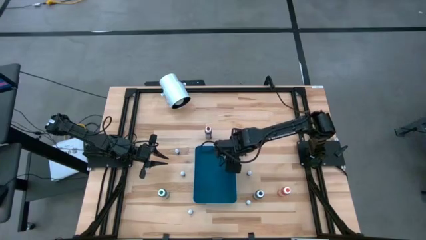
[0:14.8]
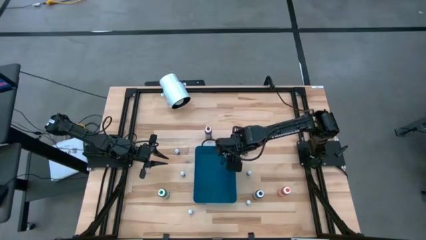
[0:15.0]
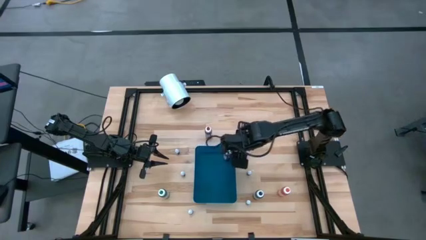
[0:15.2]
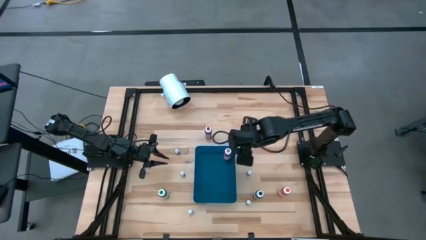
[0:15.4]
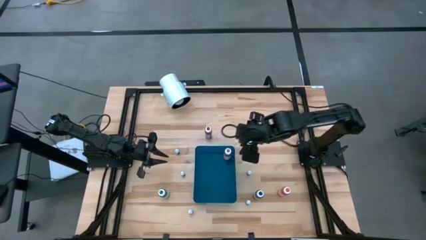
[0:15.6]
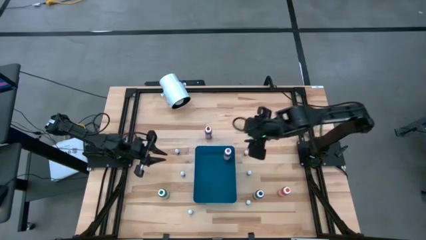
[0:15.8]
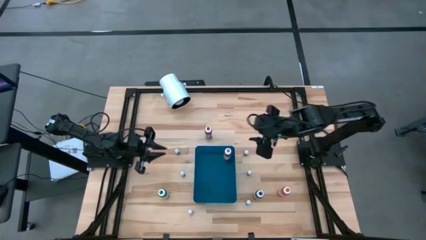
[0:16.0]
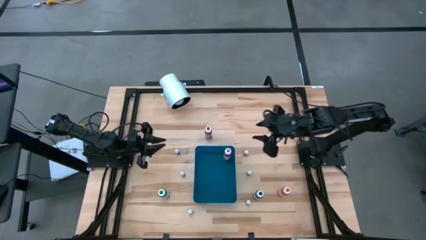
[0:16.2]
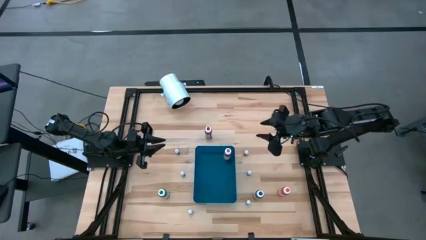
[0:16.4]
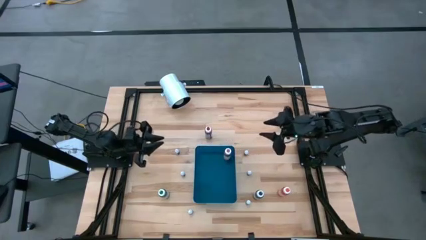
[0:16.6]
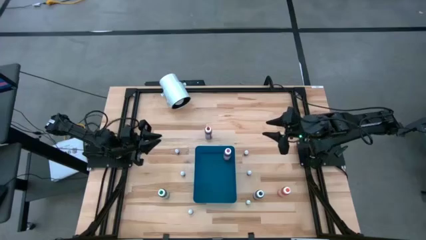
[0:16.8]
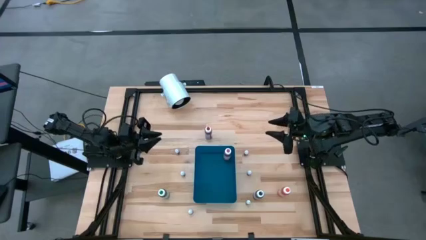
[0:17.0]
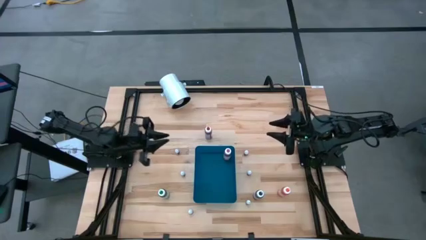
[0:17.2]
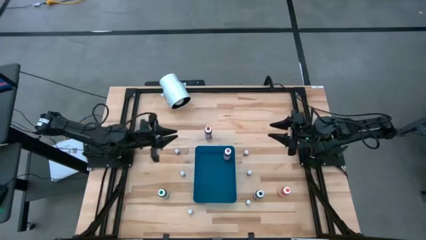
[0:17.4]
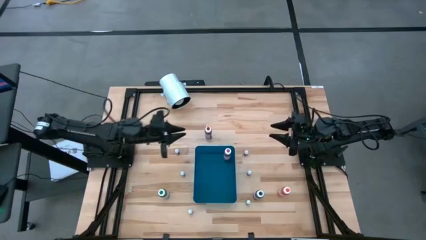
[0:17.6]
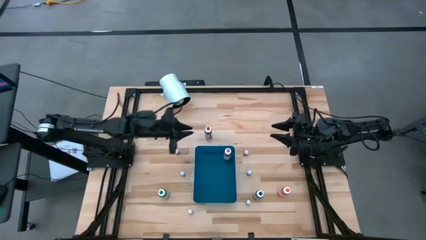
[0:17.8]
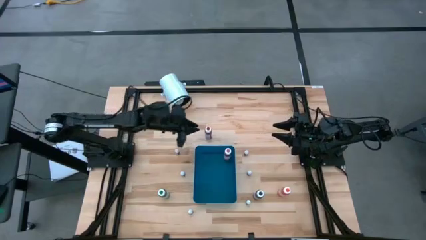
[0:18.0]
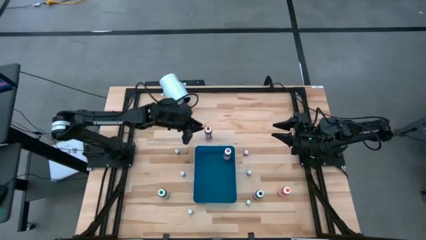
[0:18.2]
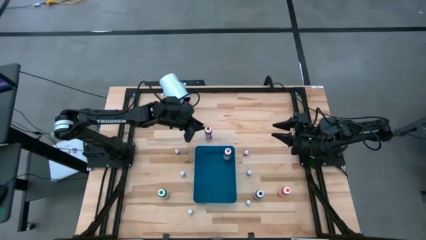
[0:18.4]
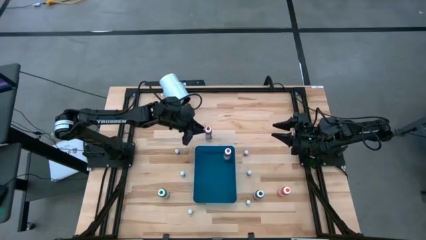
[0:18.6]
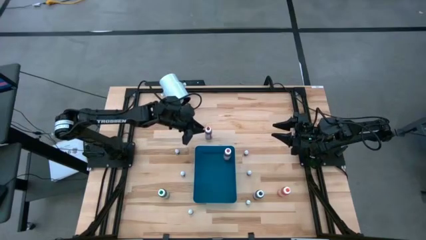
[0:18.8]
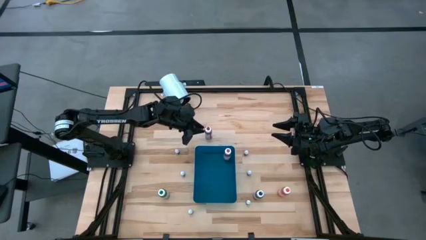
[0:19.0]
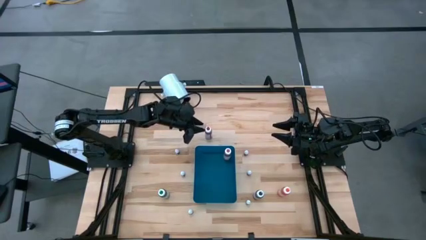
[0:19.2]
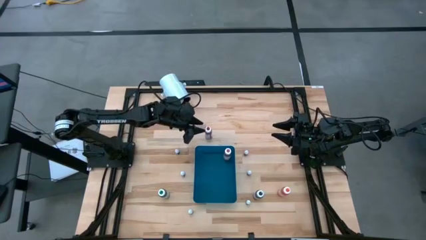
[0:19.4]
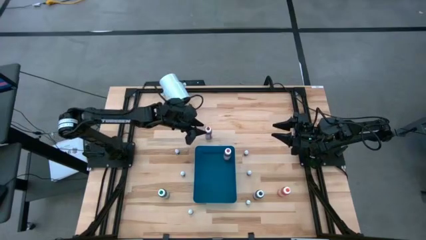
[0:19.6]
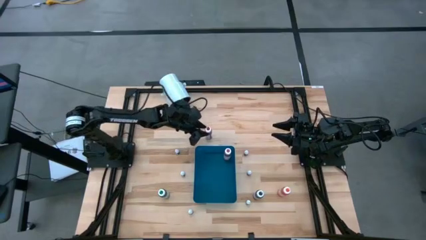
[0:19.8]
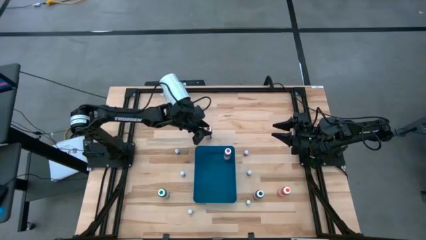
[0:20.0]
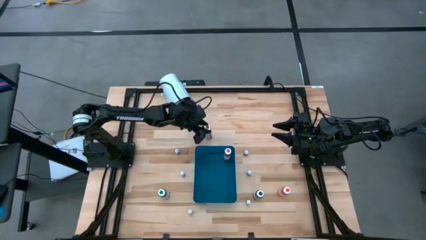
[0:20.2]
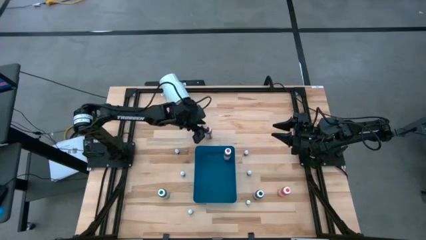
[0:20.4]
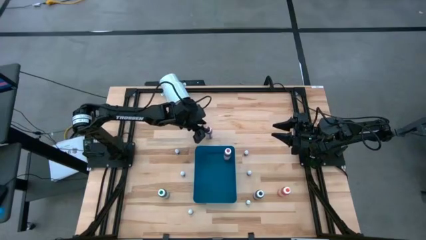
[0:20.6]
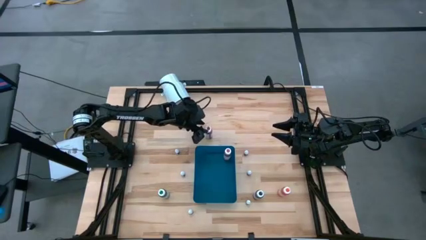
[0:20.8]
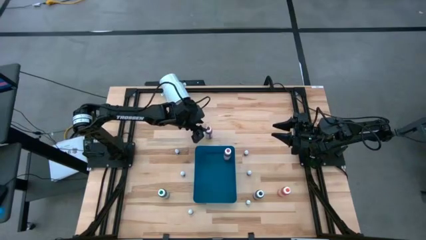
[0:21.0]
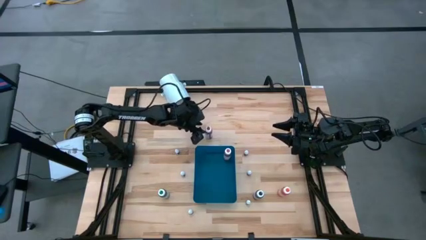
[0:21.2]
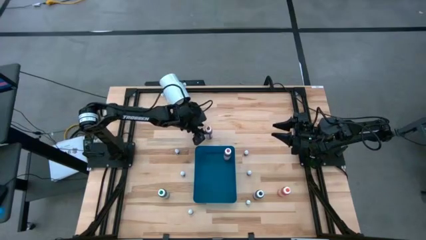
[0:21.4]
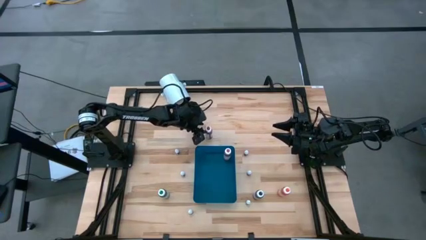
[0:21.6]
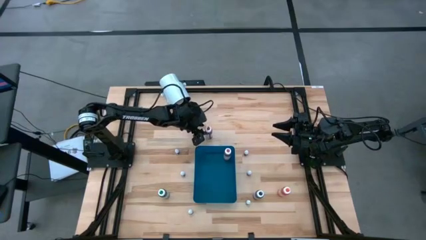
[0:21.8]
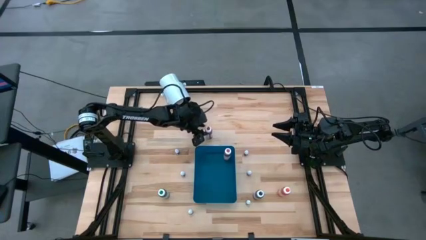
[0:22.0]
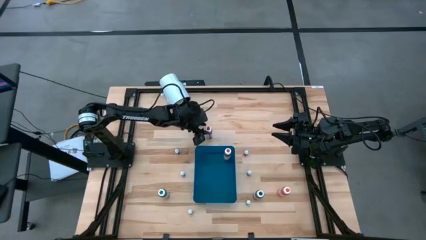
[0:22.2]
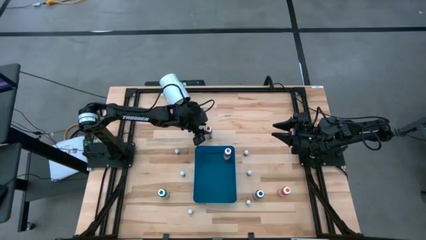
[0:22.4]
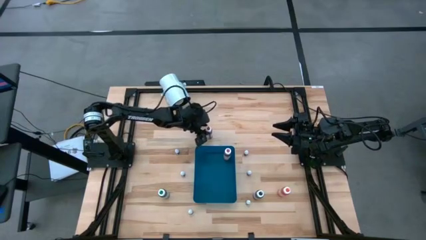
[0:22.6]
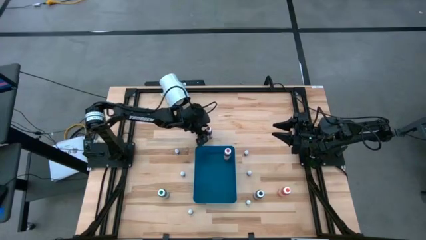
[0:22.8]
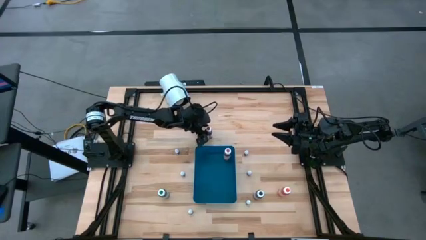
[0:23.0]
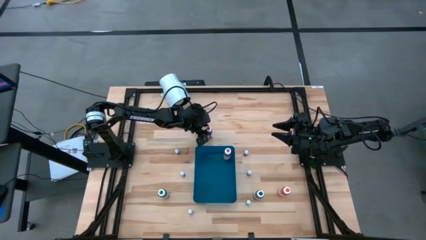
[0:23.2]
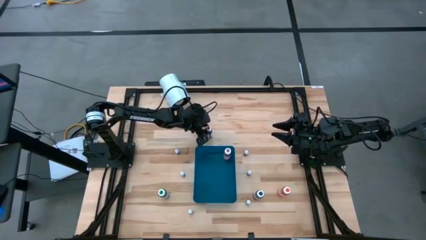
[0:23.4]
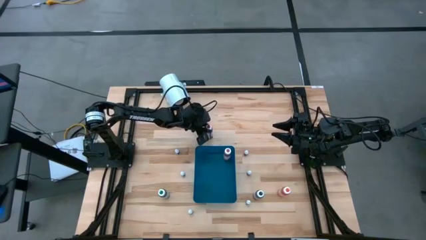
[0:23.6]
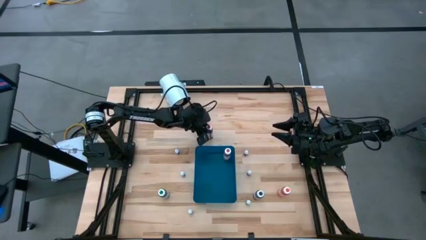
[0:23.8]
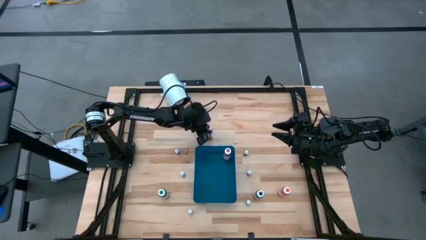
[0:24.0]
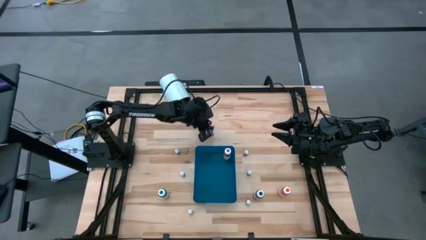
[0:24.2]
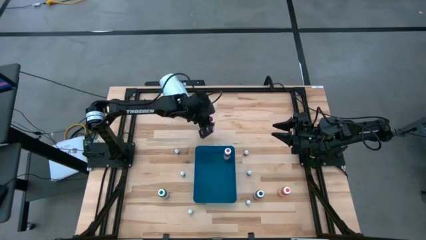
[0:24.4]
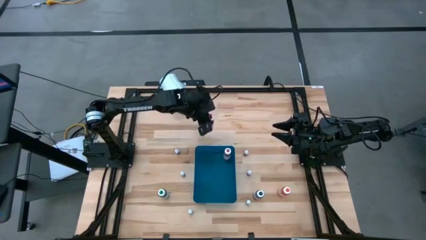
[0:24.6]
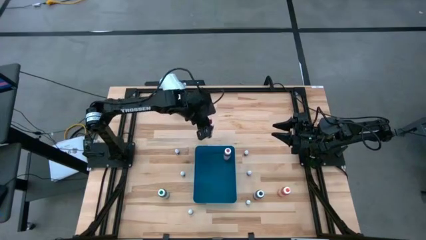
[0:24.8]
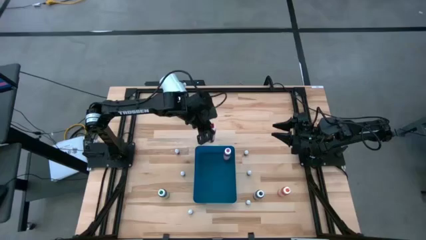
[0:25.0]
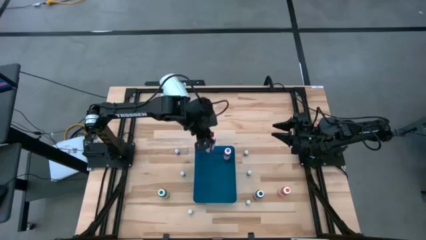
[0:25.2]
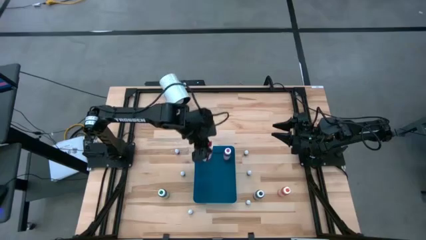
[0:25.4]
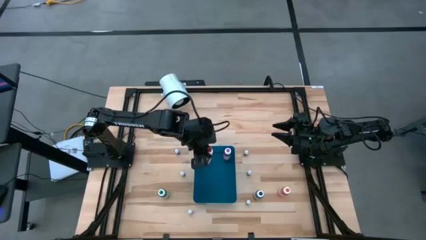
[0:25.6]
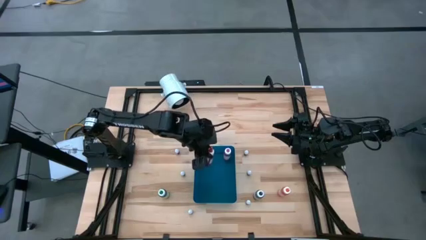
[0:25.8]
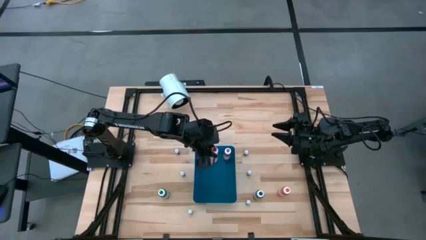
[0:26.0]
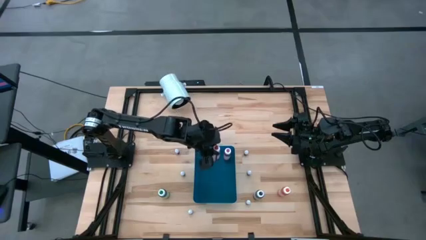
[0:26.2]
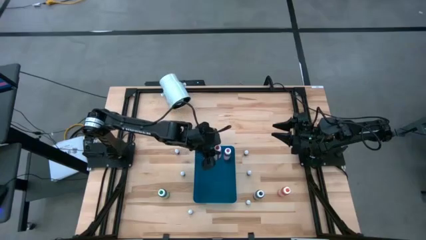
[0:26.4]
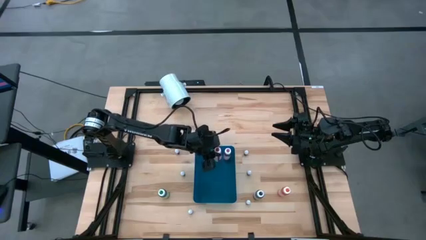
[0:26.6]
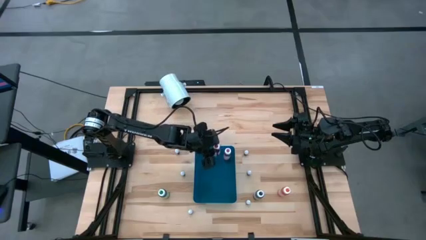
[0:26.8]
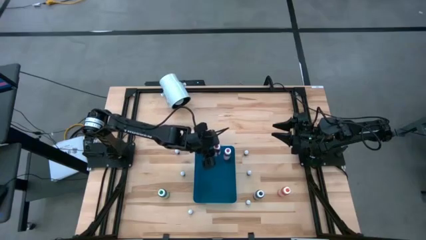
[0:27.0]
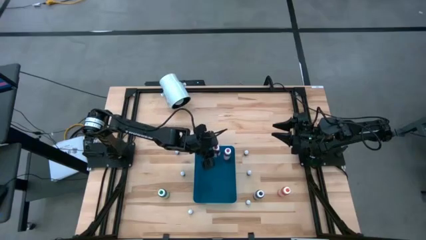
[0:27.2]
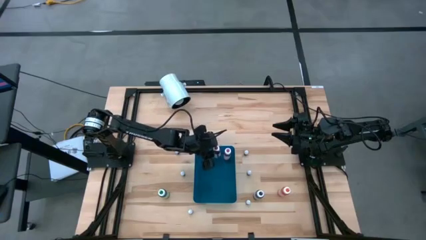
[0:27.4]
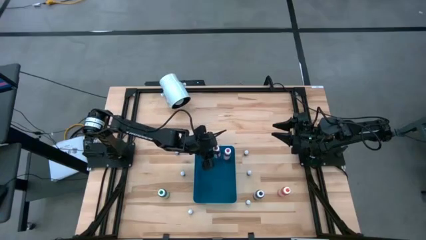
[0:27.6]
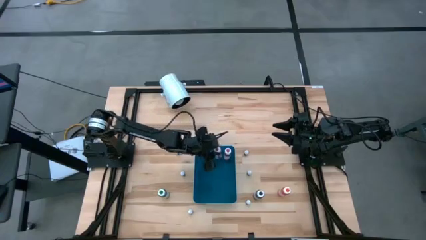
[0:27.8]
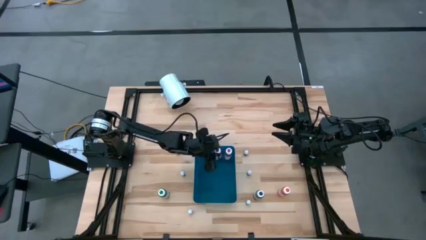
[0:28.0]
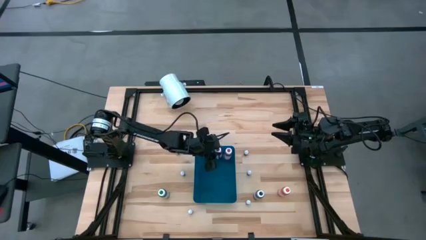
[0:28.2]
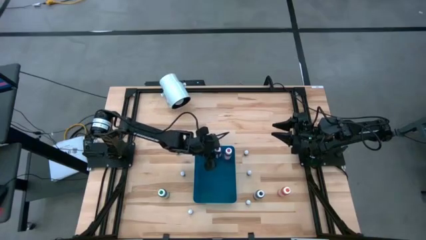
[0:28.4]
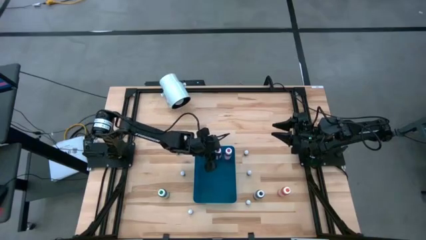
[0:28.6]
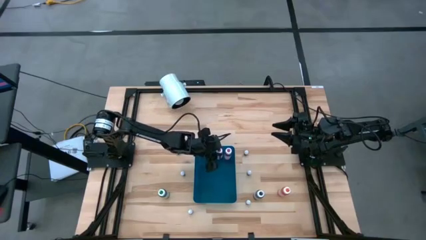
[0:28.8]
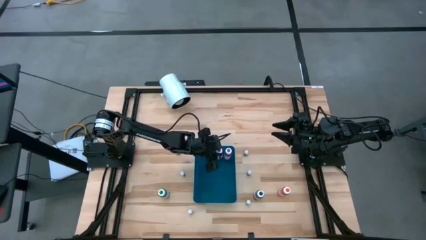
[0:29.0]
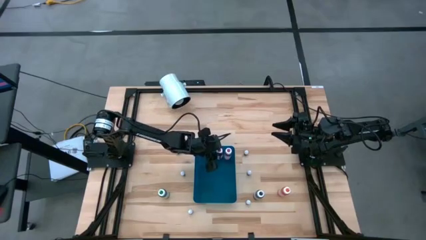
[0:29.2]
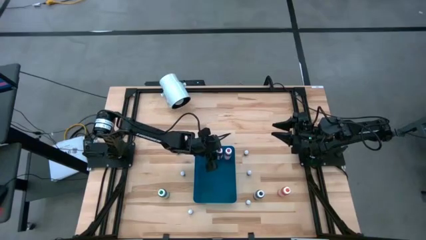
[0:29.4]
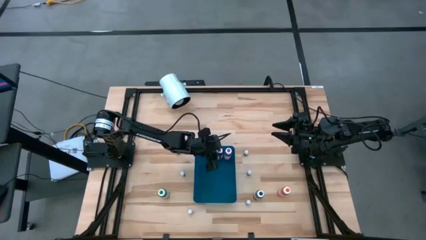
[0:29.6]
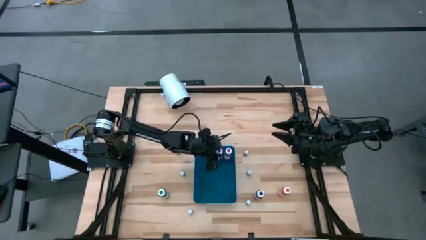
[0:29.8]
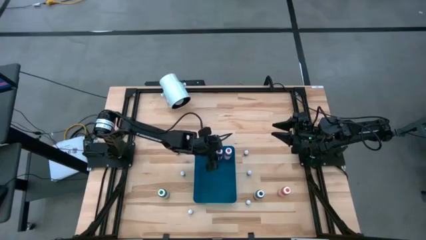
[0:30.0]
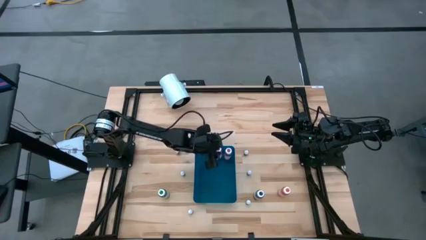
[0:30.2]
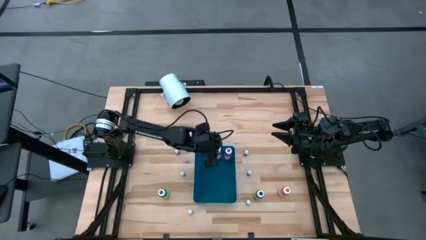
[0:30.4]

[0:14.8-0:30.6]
Task: Pick & Place food coloring
Put the big red food coloring bottle into the blue container
